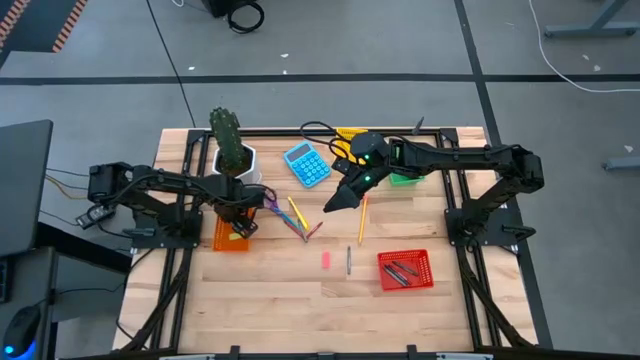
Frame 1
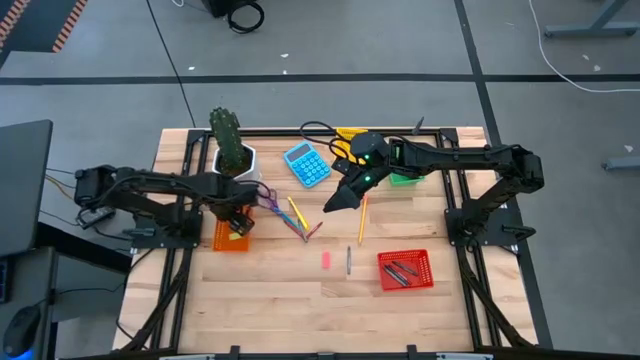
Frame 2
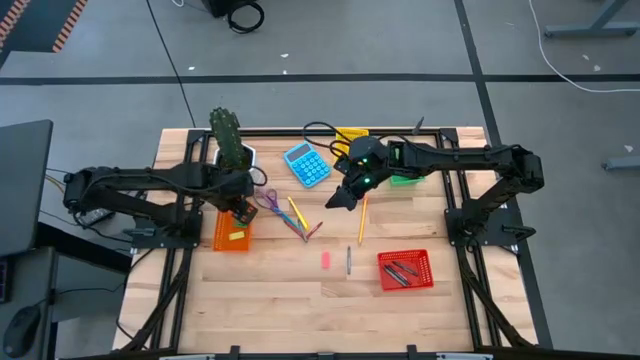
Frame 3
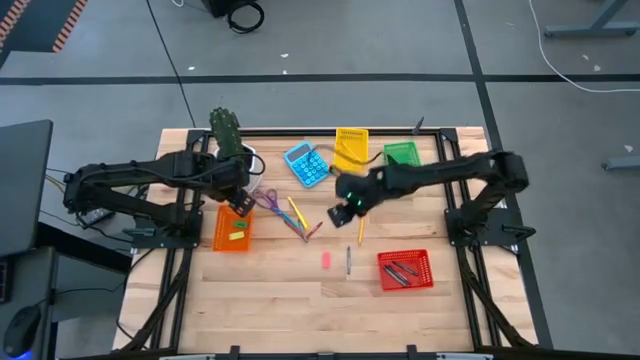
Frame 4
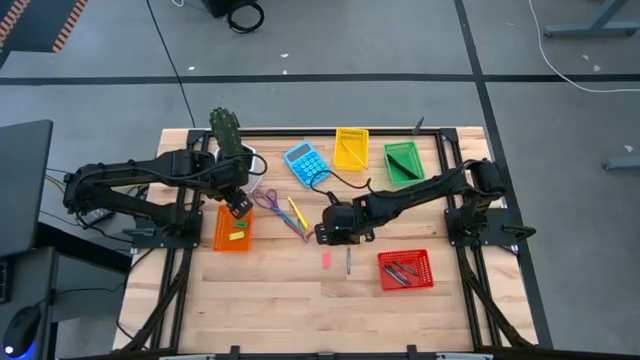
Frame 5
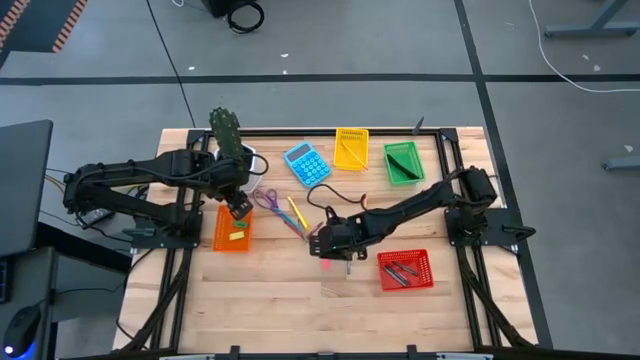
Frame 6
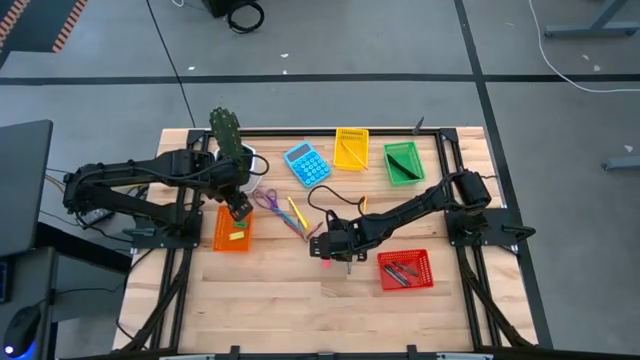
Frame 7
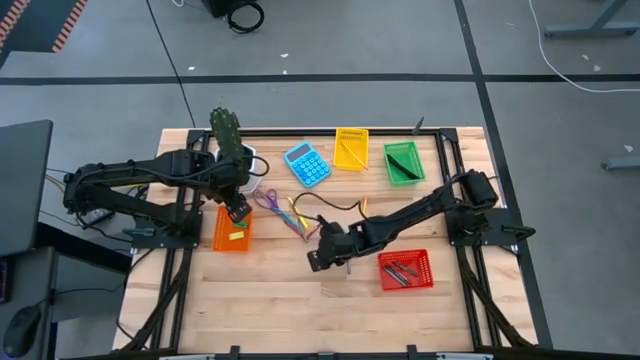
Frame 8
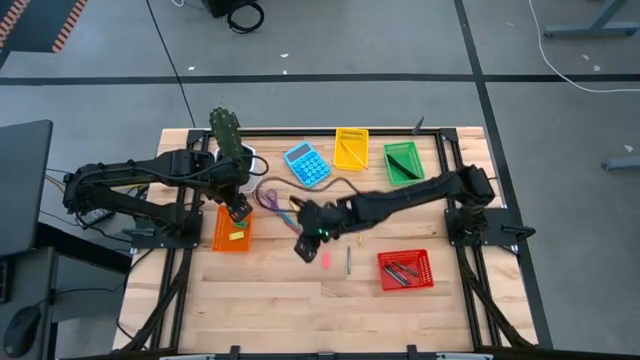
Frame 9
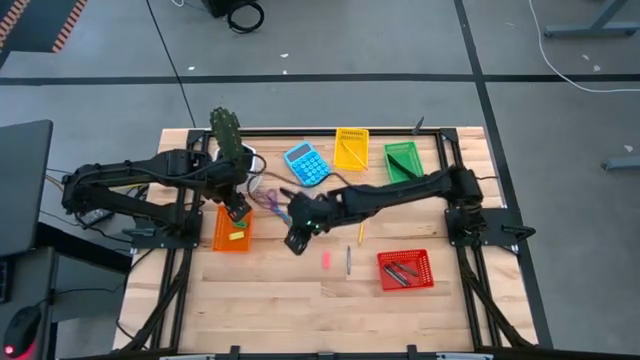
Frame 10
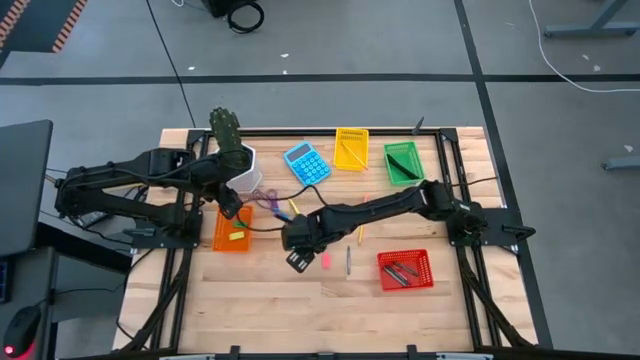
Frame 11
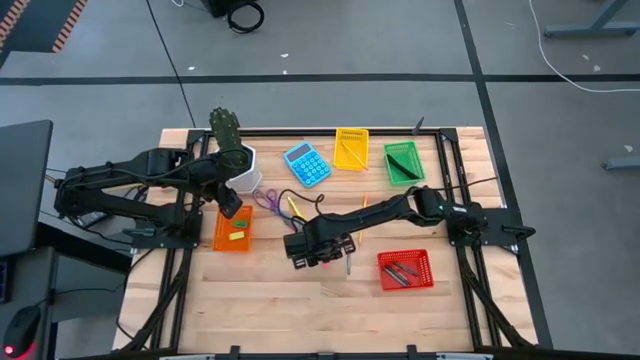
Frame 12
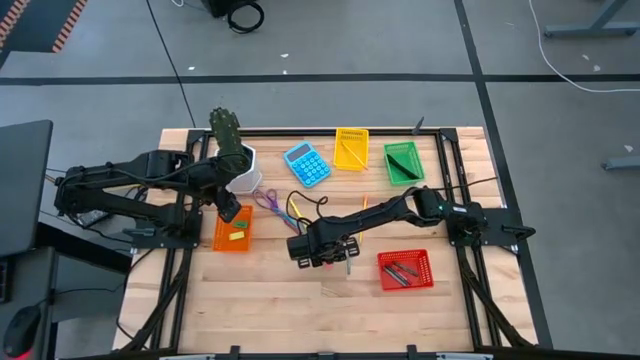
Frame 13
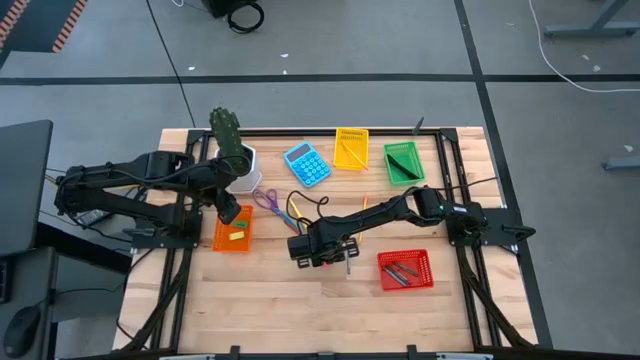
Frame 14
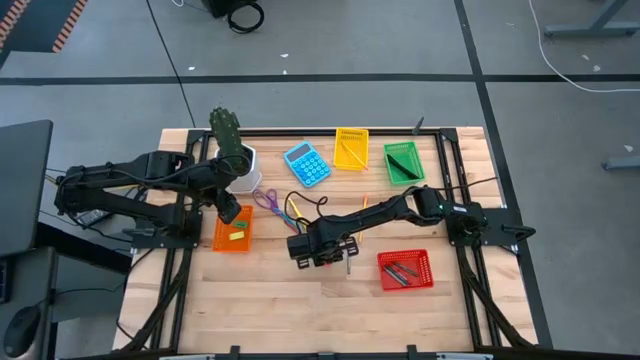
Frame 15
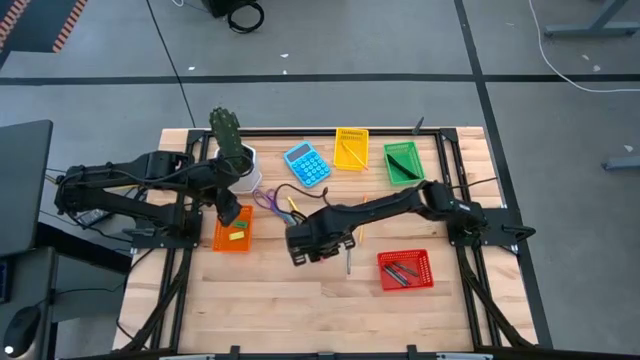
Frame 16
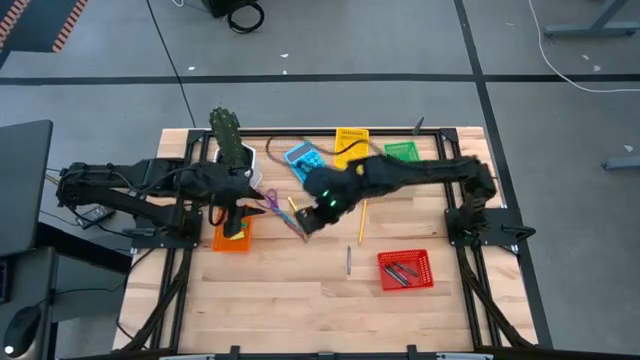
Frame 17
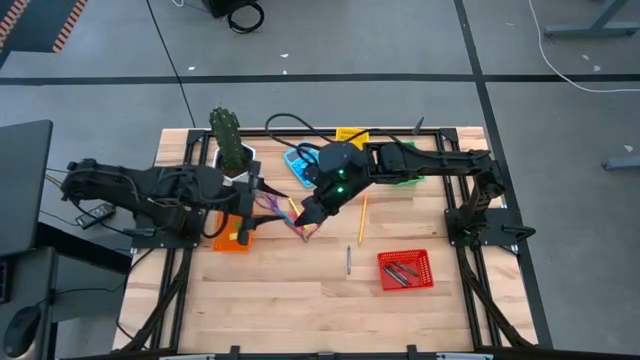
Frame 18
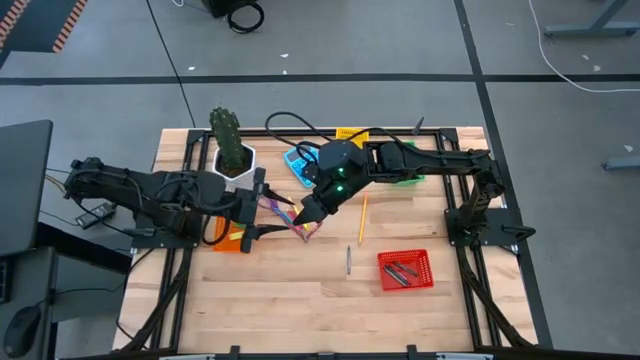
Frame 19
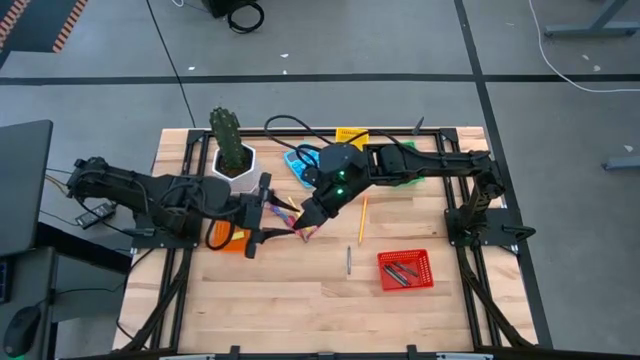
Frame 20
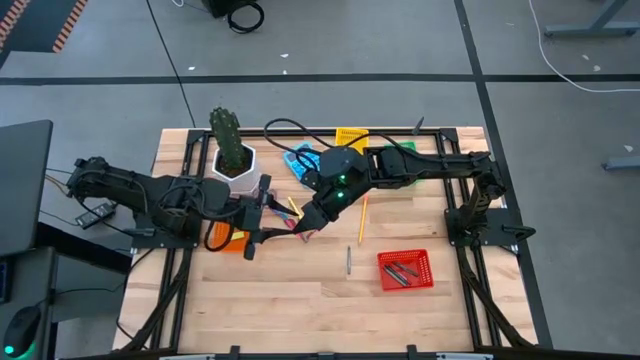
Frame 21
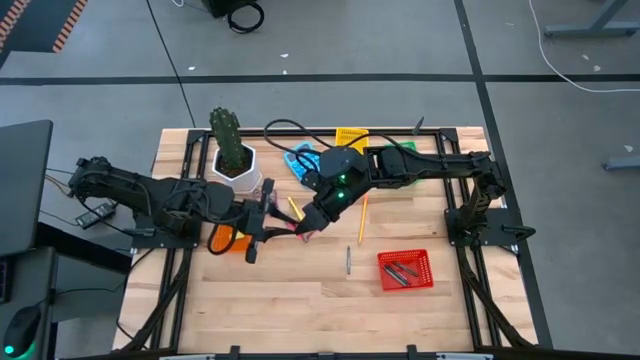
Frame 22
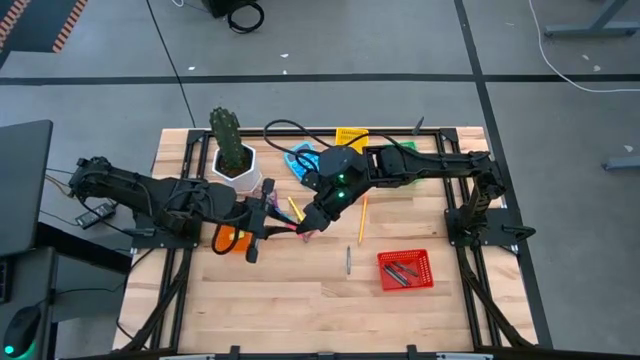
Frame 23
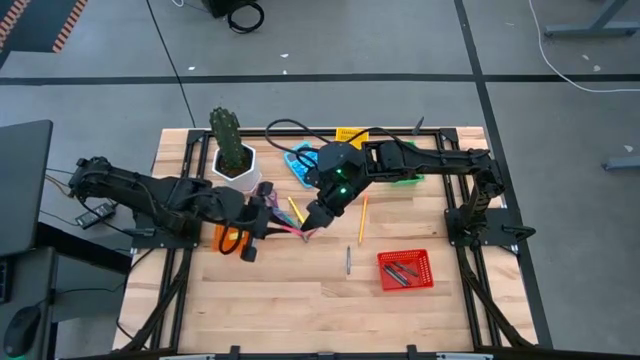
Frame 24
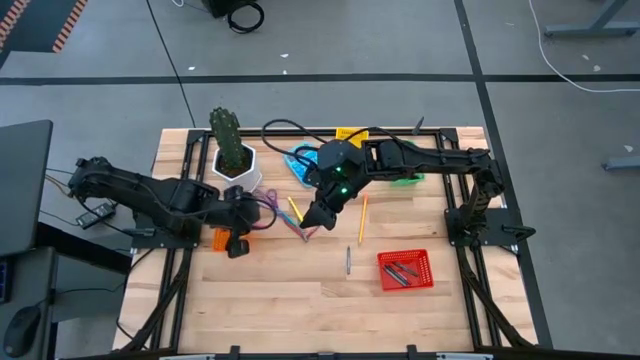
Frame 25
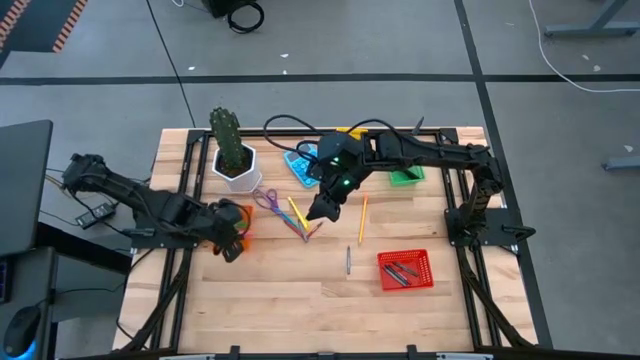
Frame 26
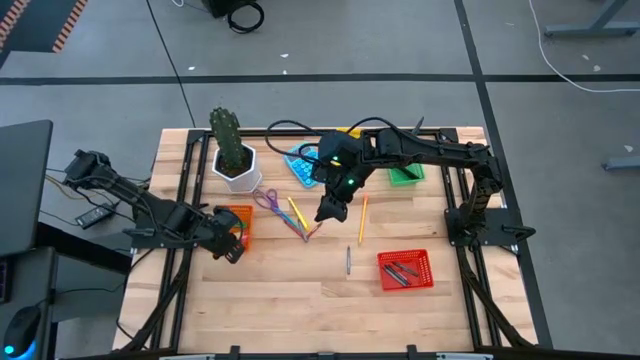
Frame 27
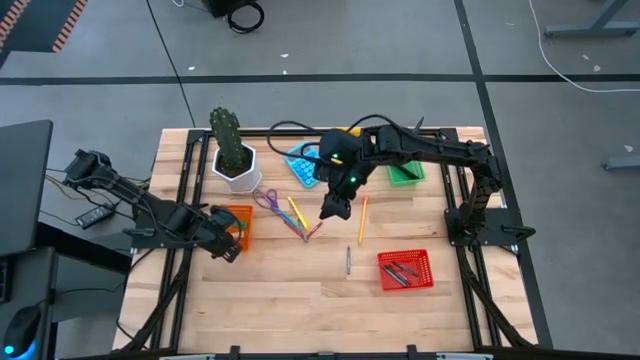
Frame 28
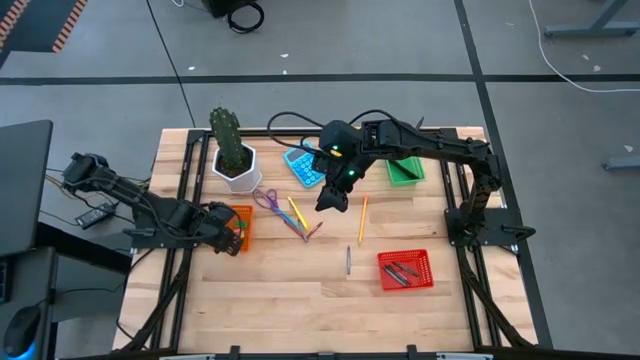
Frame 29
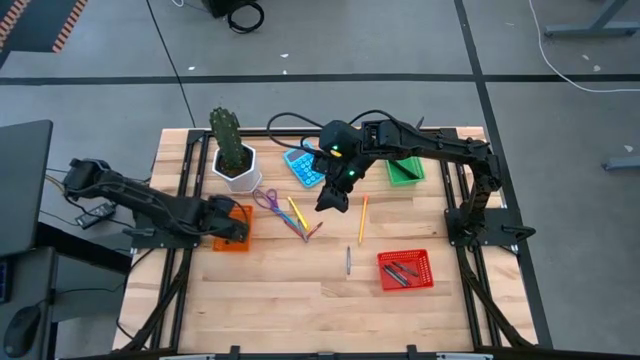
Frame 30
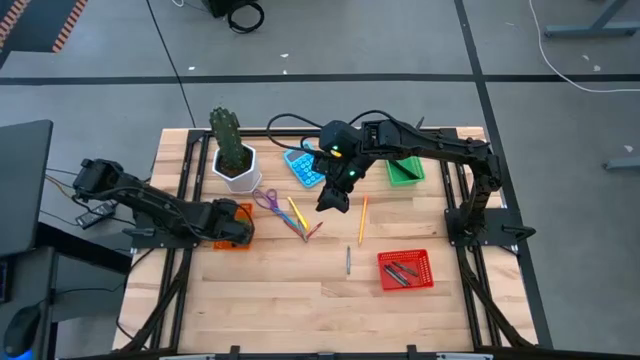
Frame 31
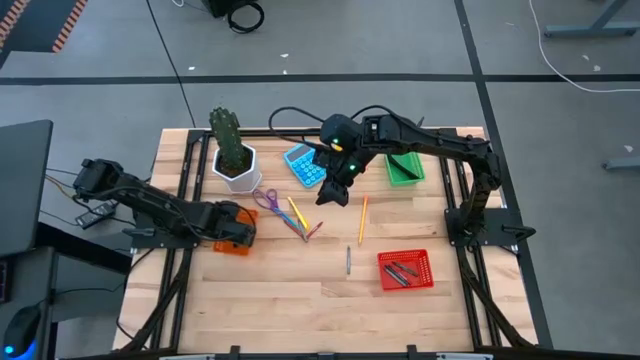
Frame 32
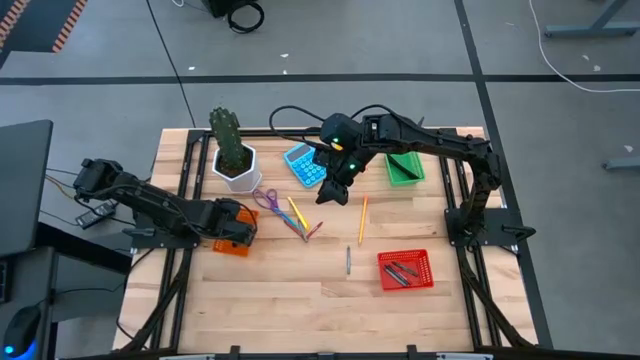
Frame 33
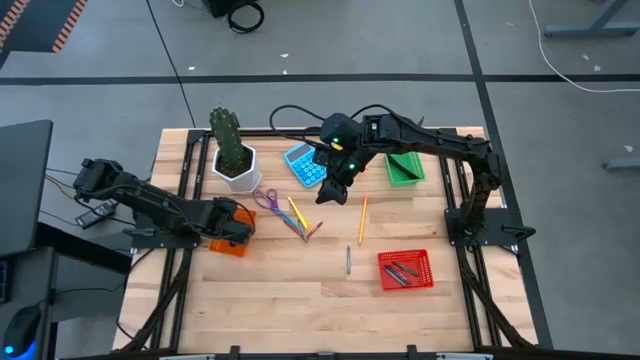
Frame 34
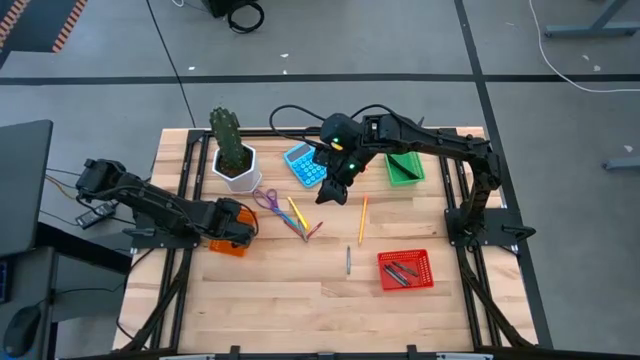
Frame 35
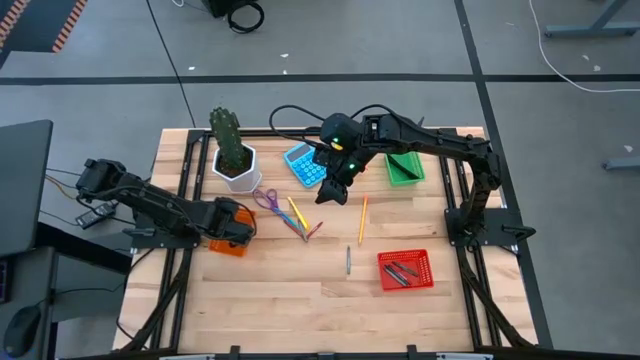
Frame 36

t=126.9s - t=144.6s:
Task: Sort crayons/erasers/pens/pencils in bins
Put the pink eraser into the orange bin

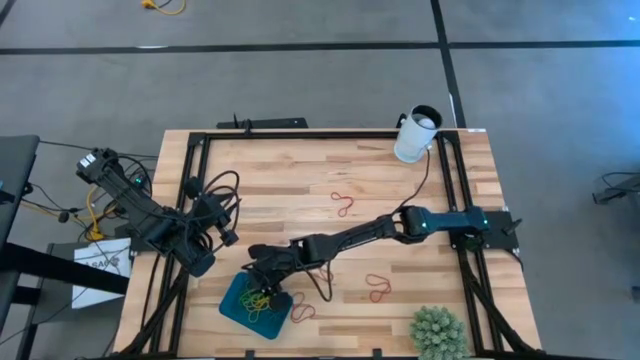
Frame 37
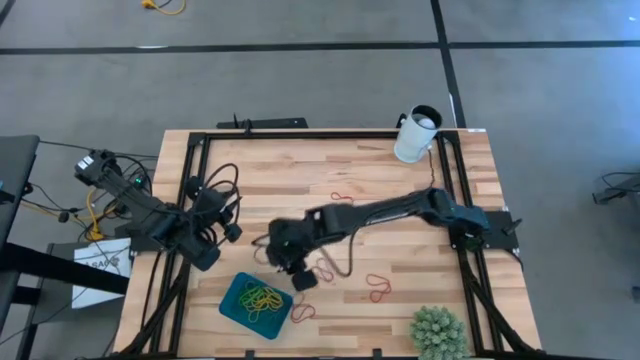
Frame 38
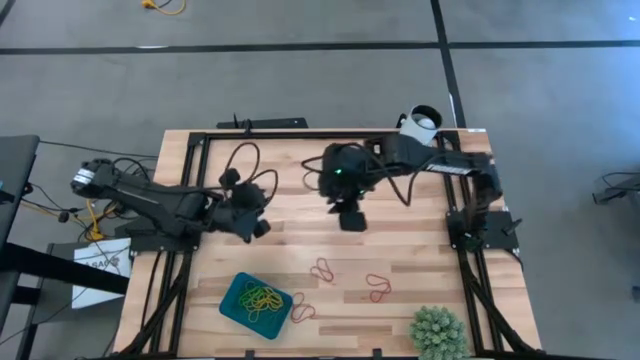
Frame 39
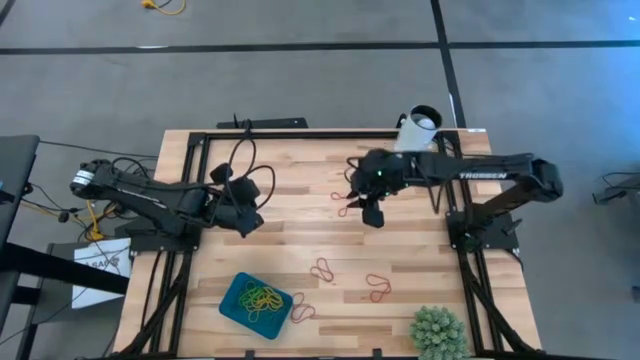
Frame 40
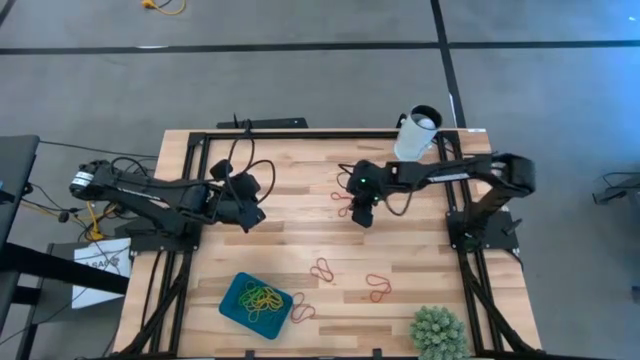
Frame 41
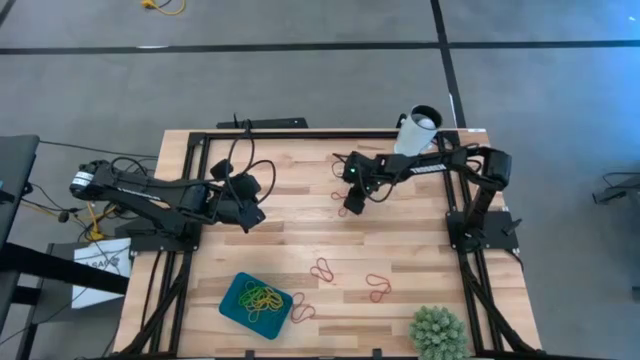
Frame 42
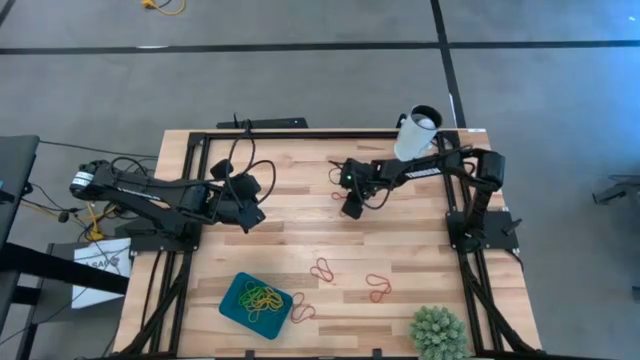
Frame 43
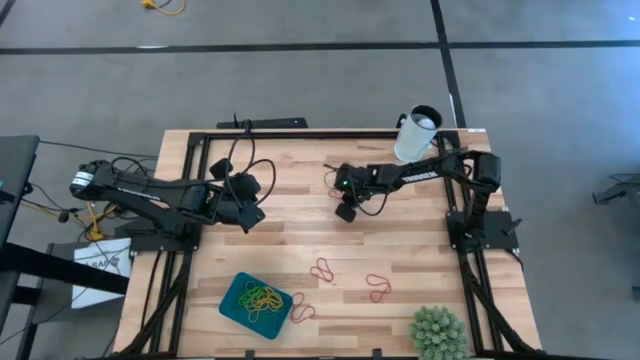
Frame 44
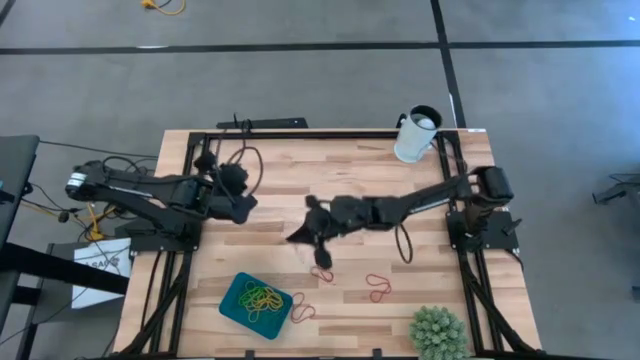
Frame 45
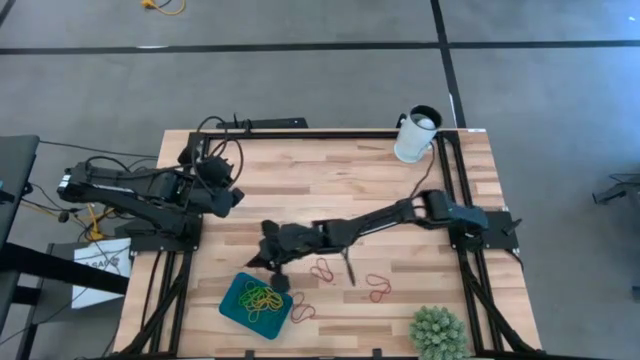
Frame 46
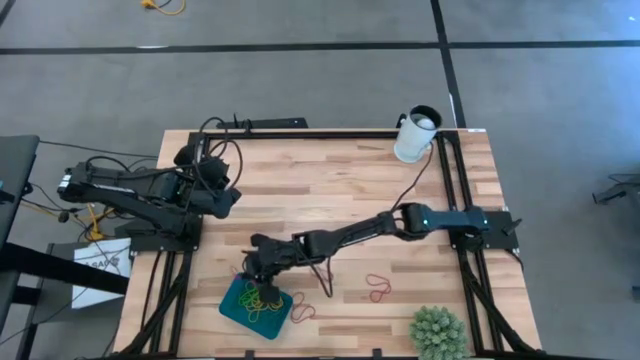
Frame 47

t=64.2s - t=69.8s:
Task: Pick and place items into bin
Put the red rubber band into the blue bin
